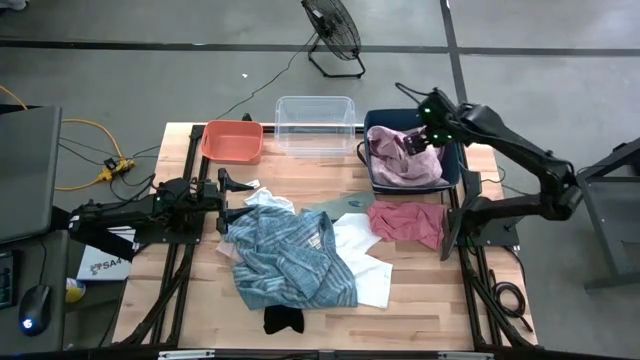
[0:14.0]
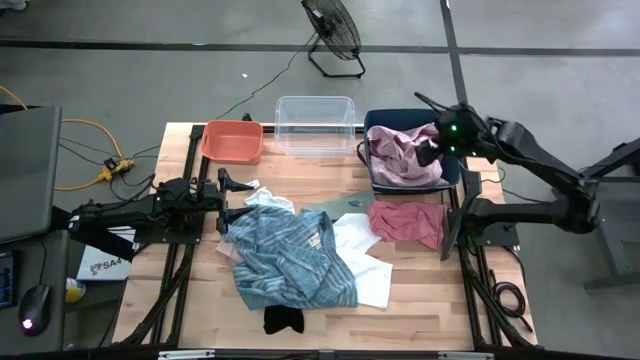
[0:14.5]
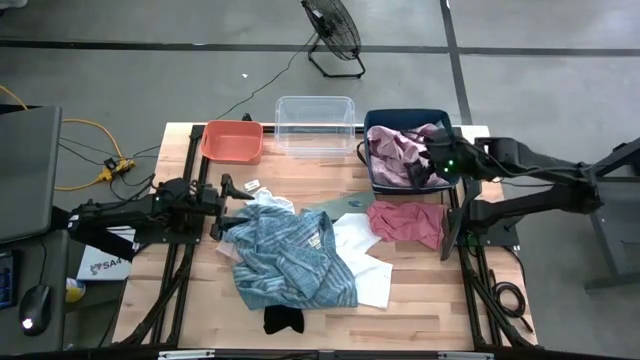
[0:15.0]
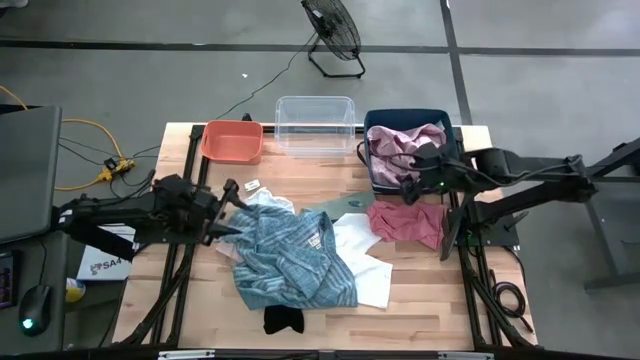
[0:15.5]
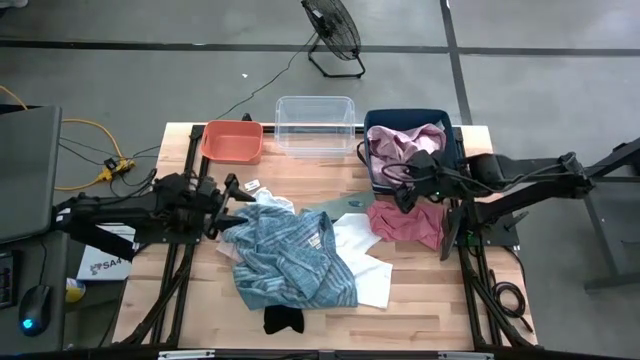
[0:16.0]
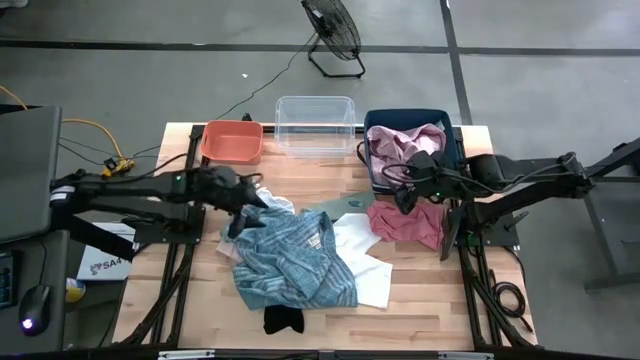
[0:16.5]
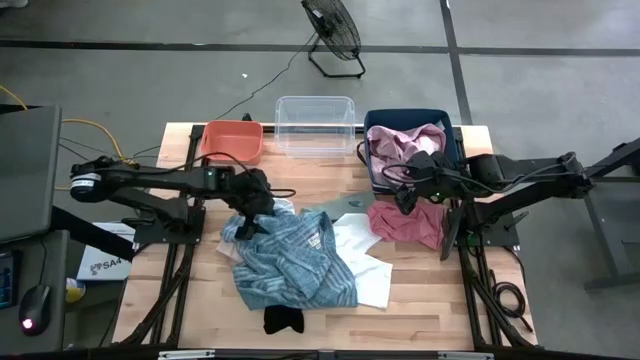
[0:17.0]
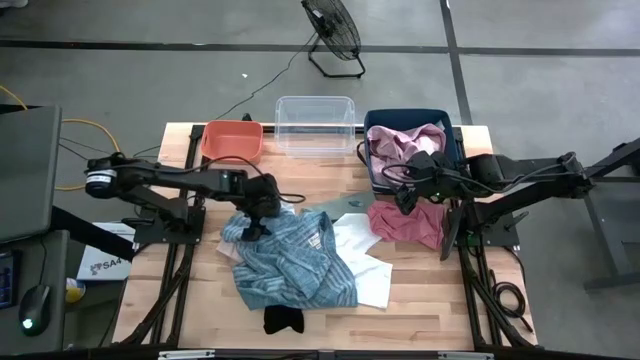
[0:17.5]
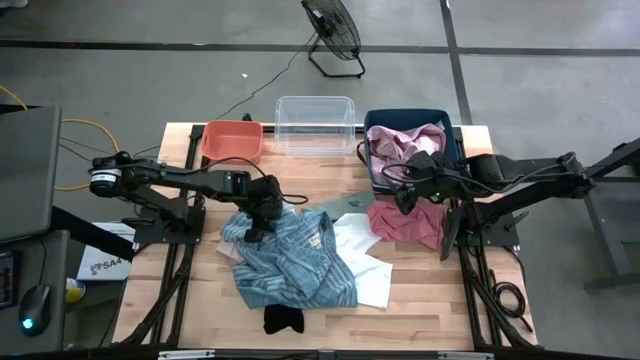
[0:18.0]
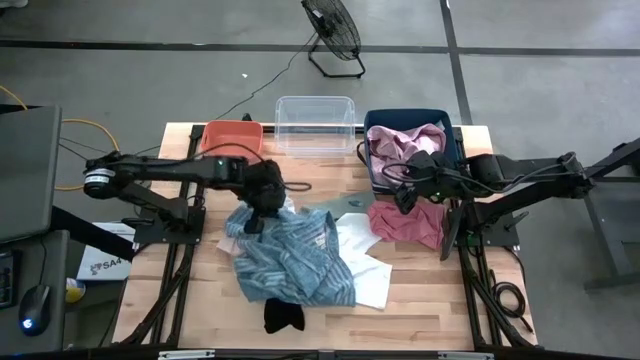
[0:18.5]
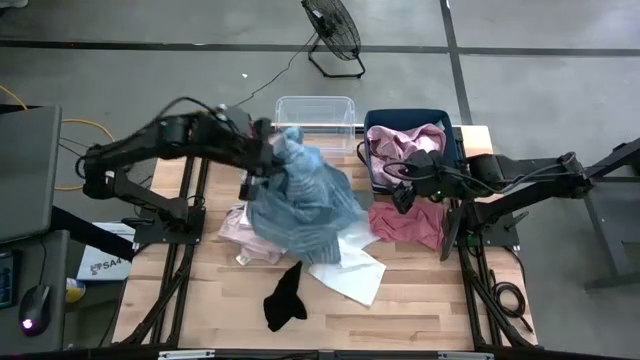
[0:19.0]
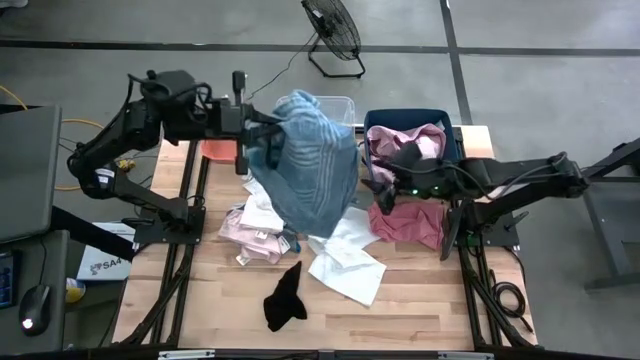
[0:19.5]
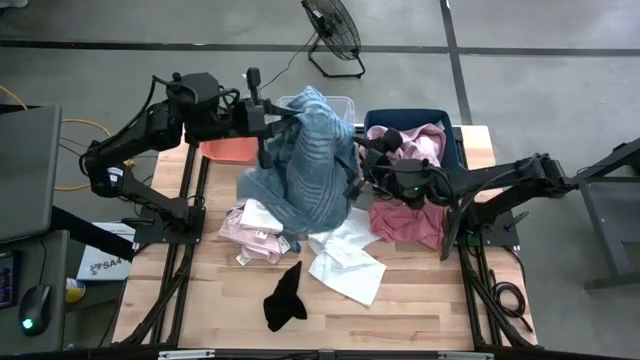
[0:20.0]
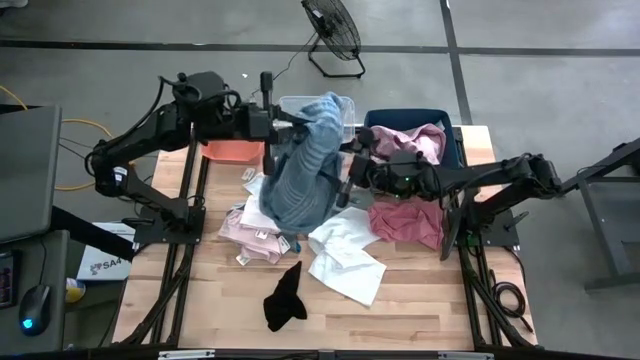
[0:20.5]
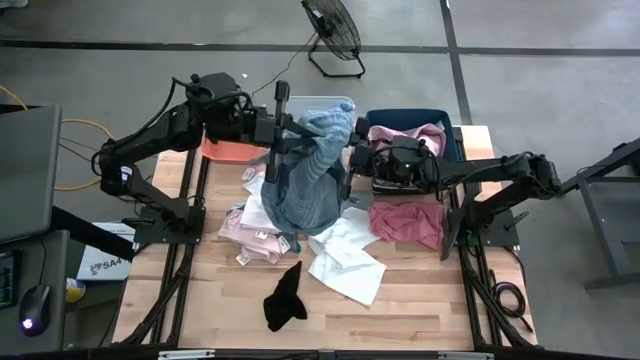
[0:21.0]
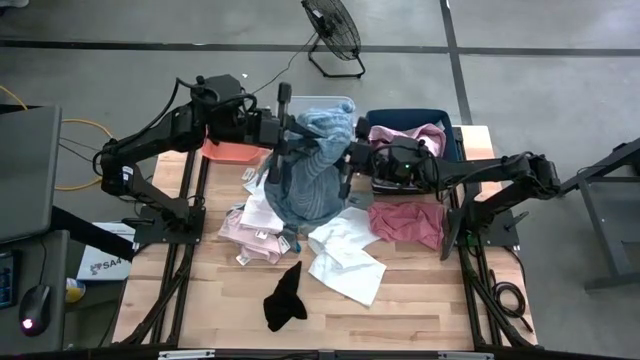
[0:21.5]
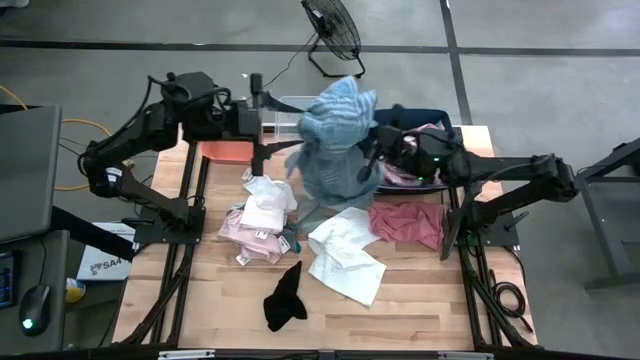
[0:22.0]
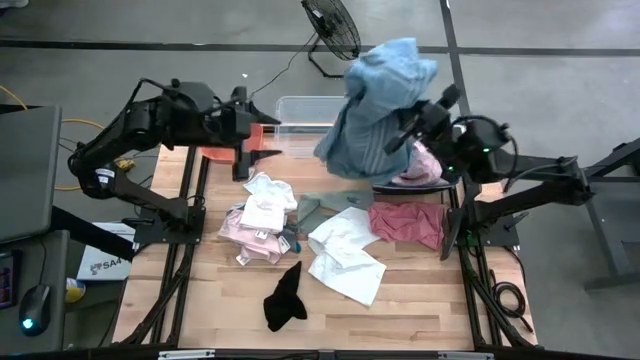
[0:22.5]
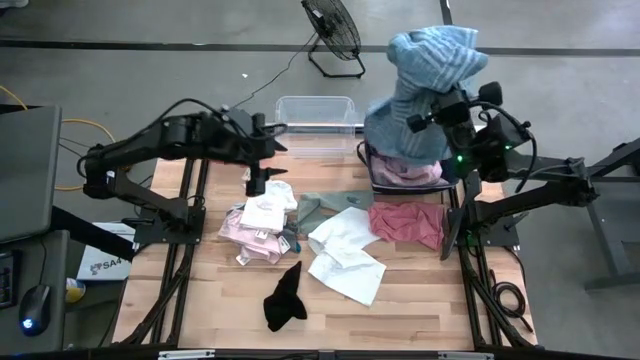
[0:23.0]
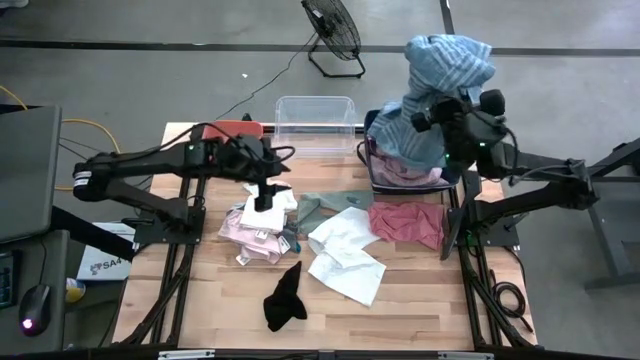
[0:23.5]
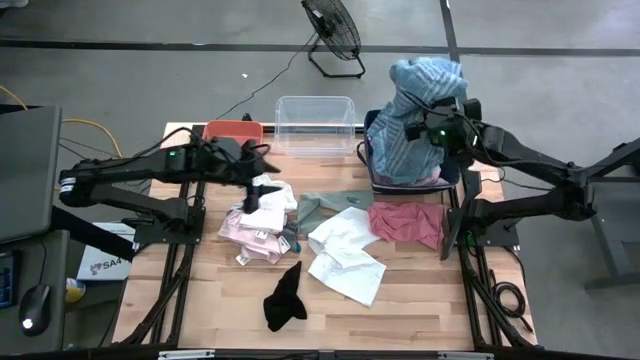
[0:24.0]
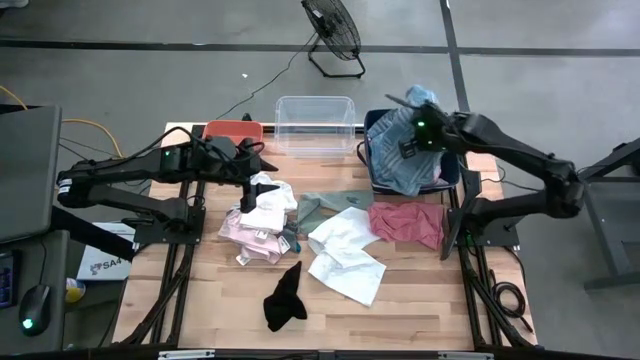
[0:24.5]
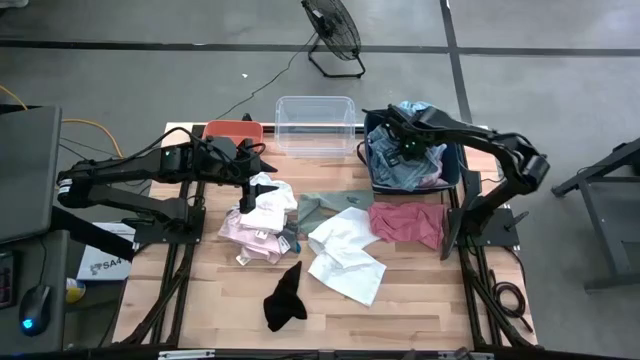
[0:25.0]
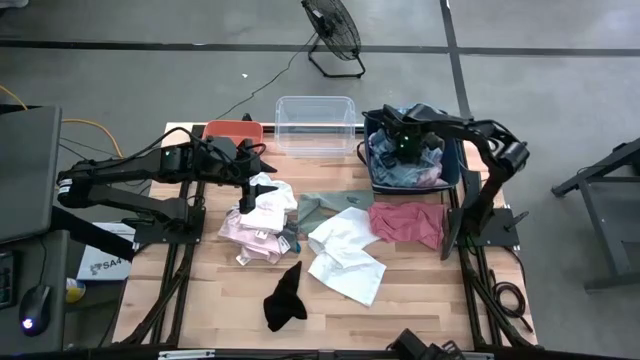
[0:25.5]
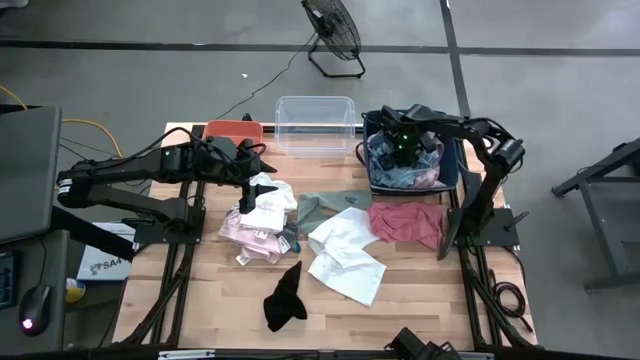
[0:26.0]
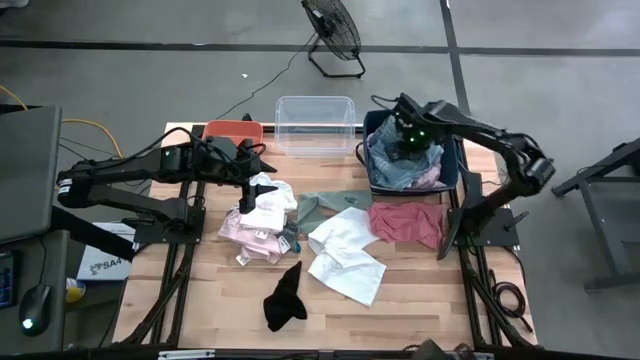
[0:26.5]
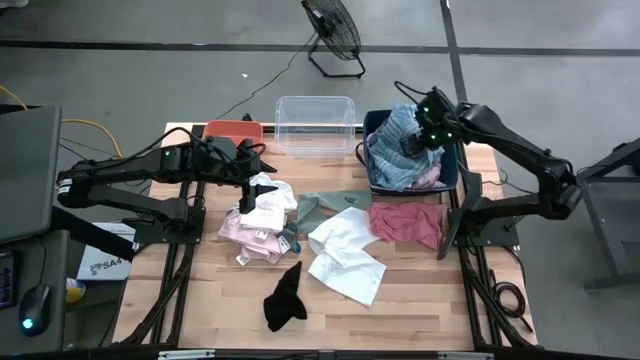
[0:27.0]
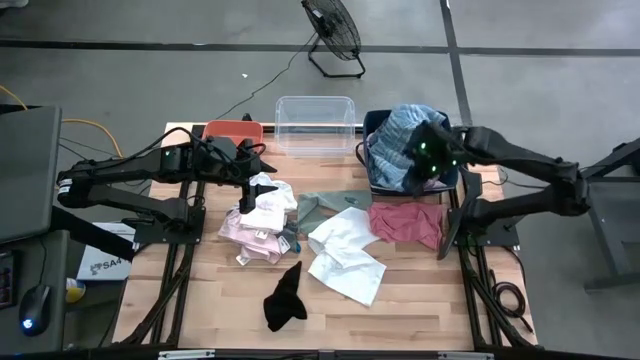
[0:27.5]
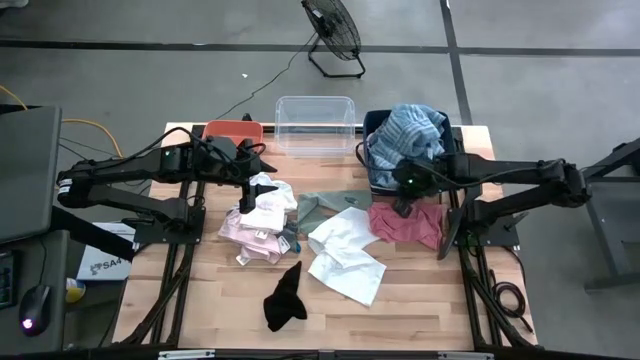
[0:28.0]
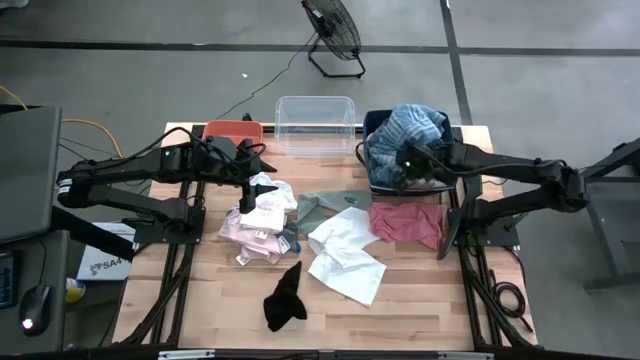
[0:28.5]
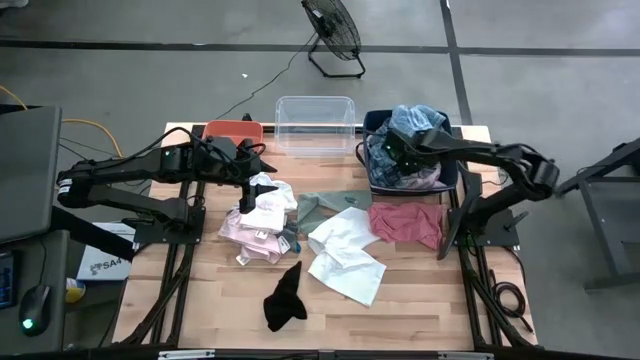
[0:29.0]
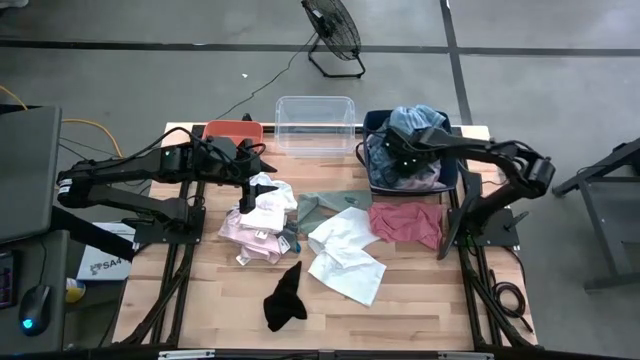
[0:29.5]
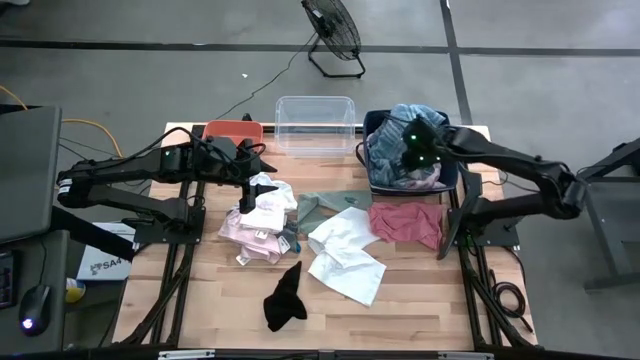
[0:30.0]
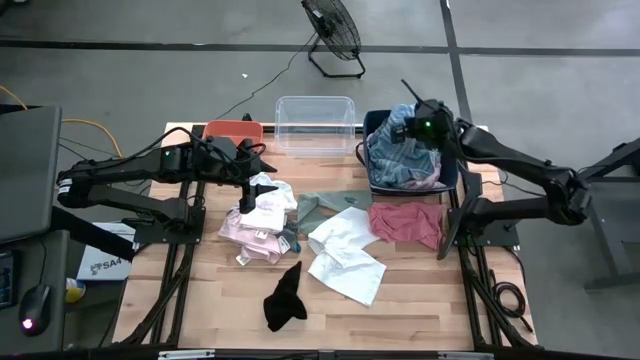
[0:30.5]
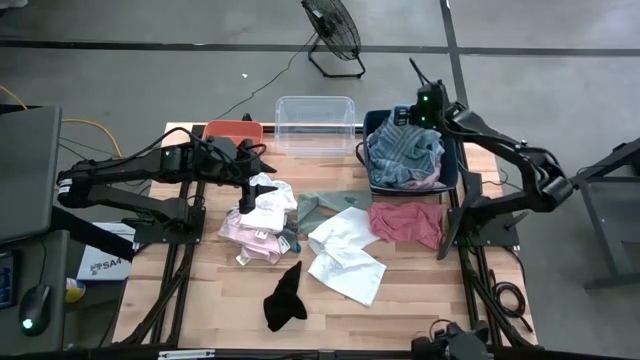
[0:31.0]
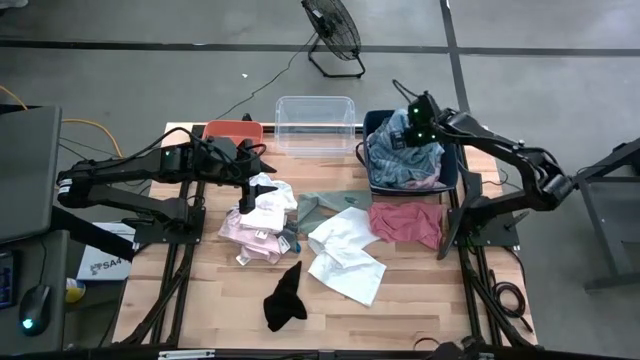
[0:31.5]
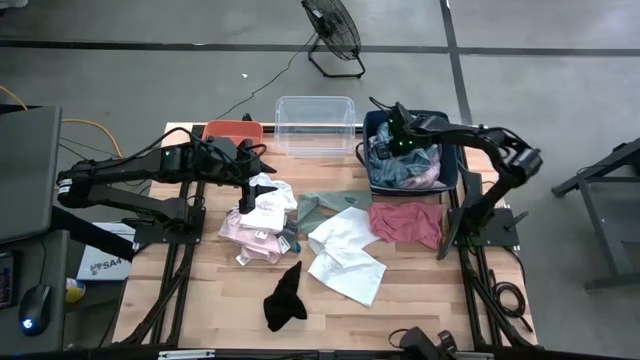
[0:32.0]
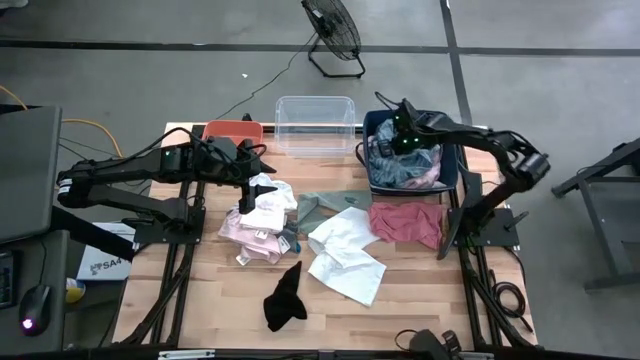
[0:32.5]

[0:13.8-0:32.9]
Task: Pick & Place Cloths
Put the blue polo shirt into the blue bin

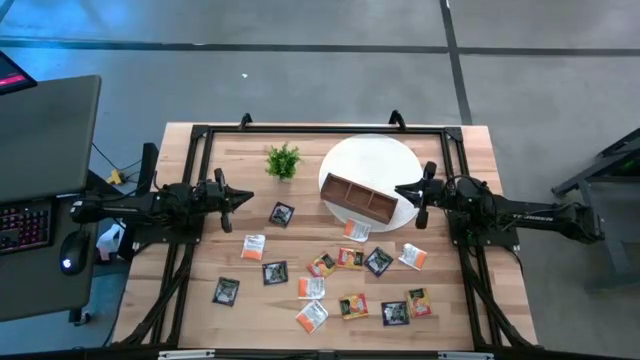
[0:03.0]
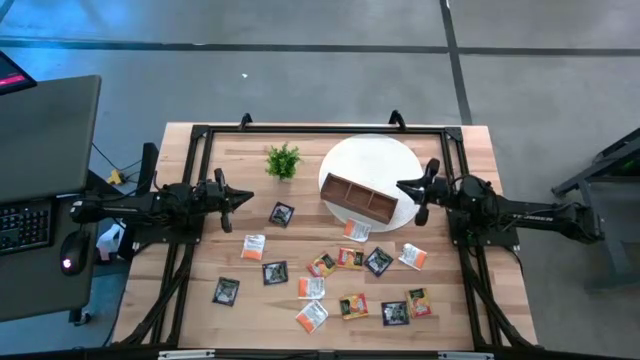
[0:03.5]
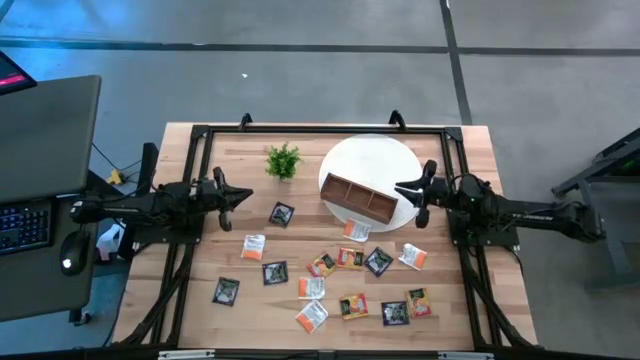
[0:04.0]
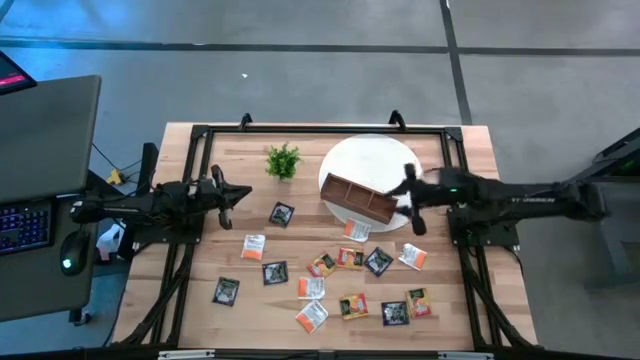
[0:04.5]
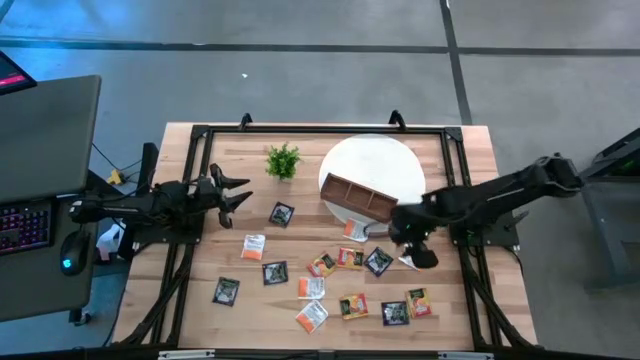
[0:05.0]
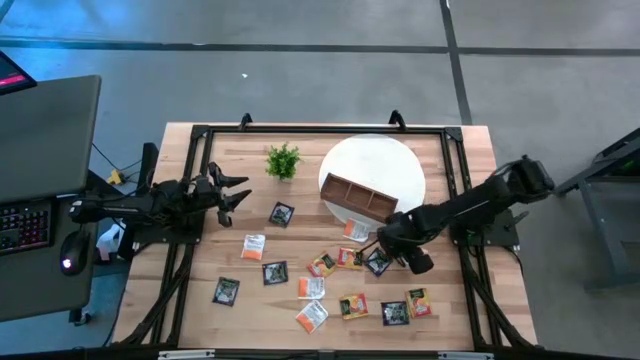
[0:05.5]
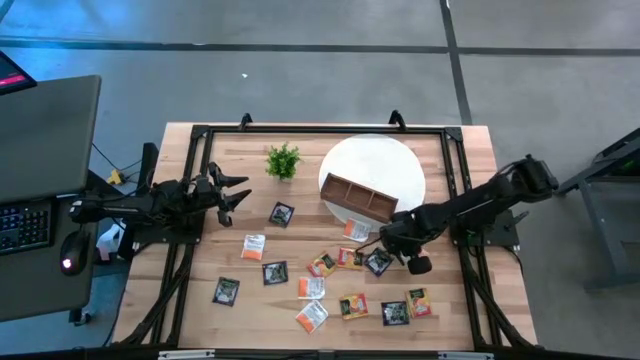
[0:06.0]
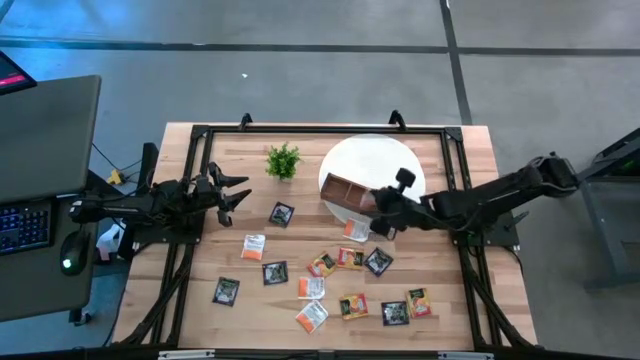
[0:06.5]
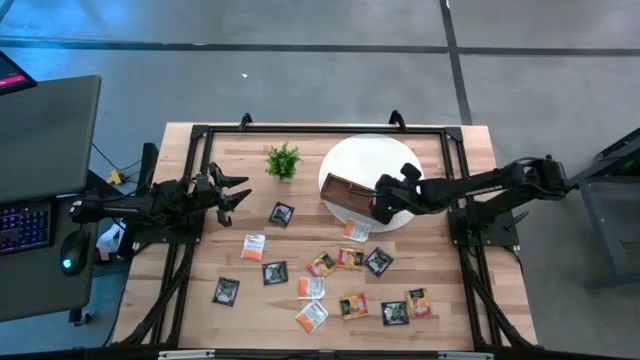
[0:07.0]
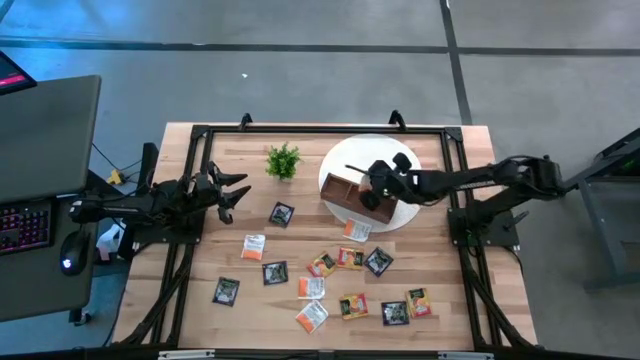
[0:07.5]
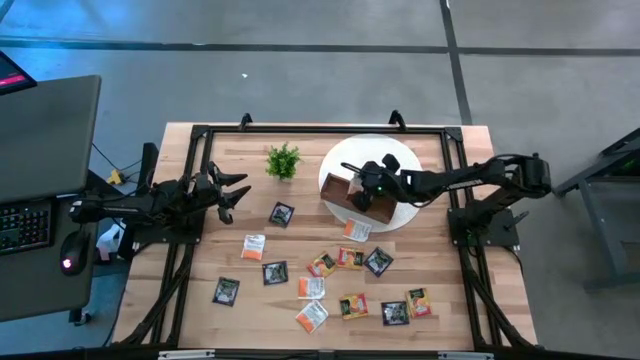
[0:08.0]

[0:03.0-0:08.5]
Task: Pick & Place Tea
Put the white tea bag into the middle compartment of the wooden organizer
